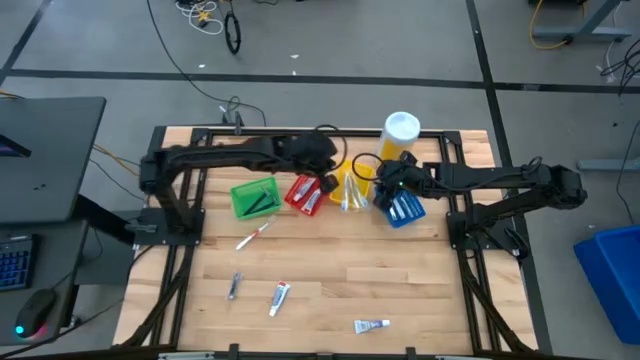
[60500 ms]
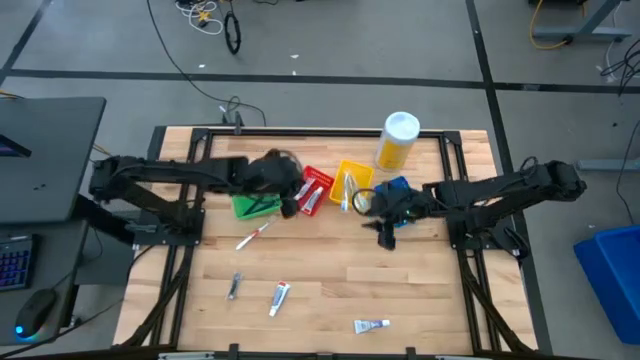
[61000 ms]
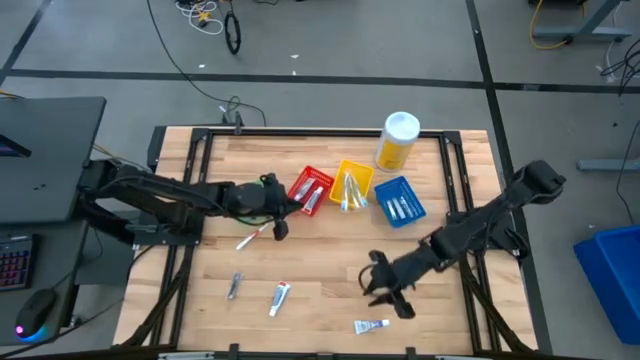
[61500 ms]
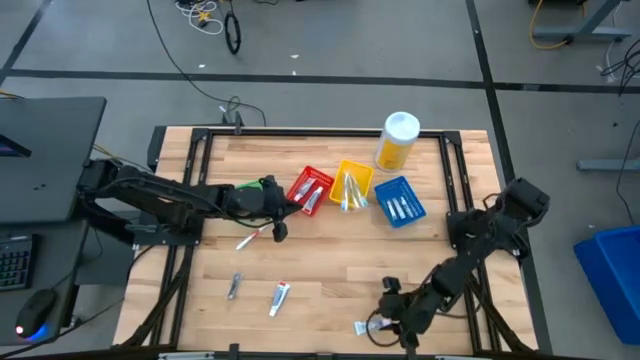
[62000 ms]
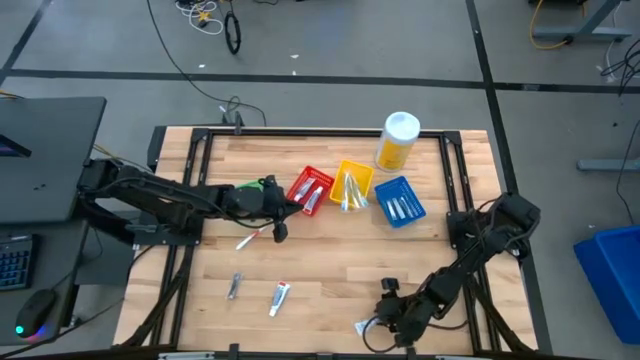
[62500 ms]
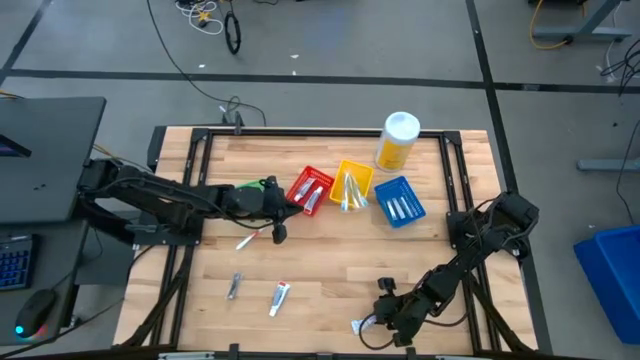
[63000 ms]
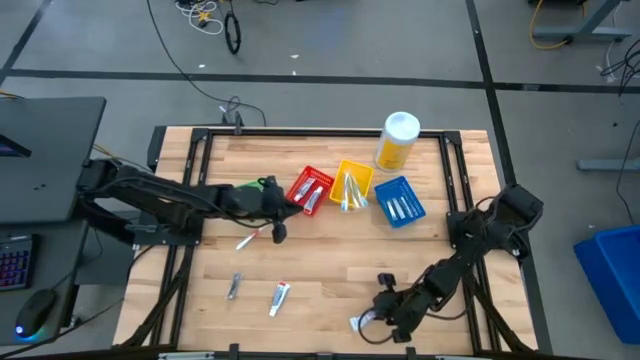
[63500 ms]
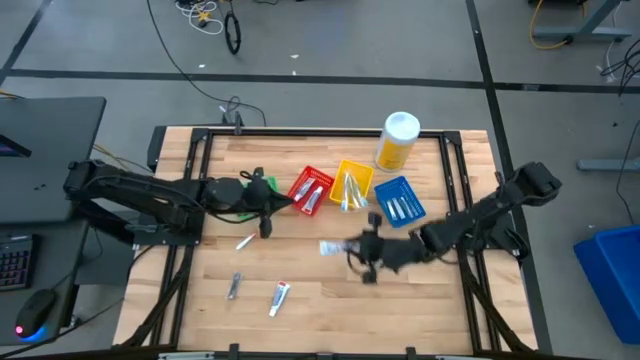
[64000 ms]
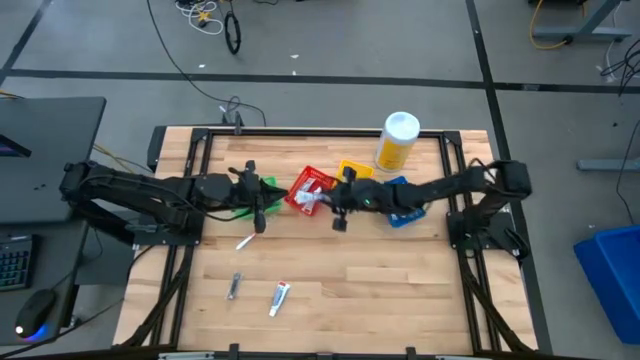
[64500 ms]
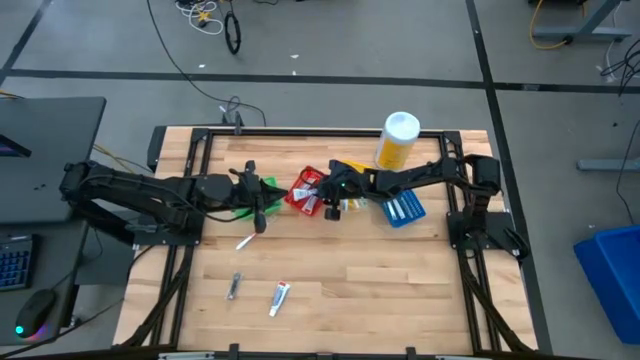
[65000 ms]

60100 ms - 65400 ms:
Task: Pick & Place Travel size toiletries
Put the white toothpaste into the red bin

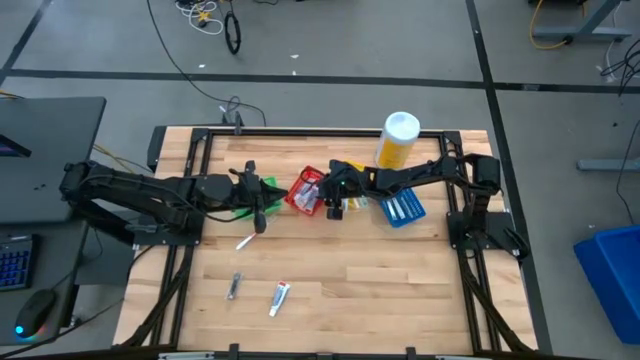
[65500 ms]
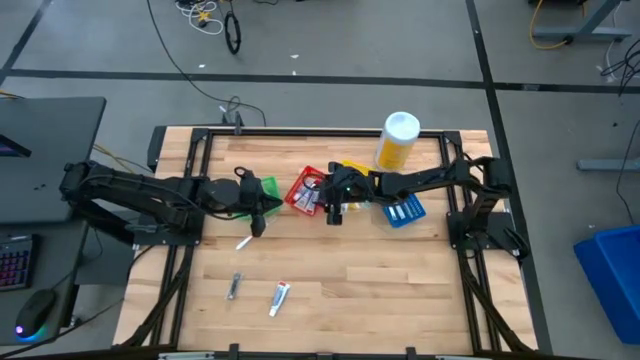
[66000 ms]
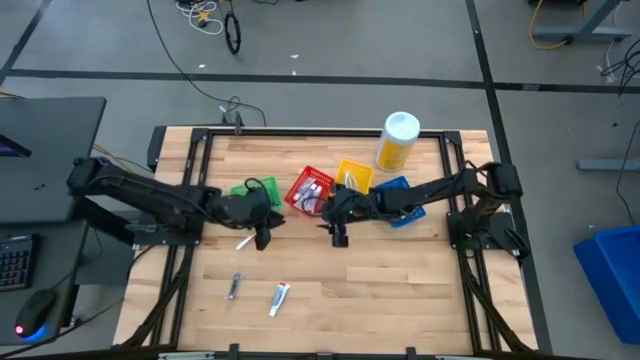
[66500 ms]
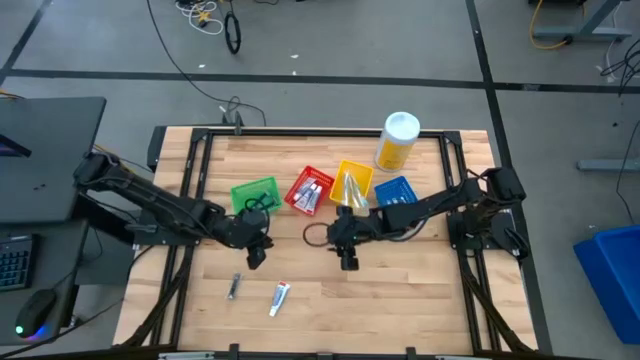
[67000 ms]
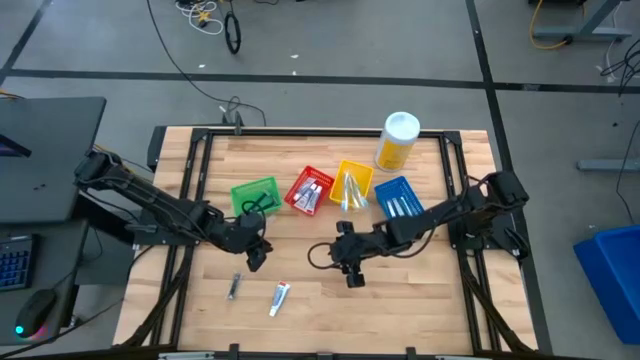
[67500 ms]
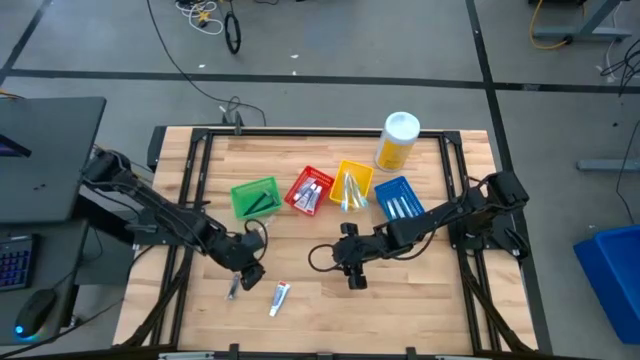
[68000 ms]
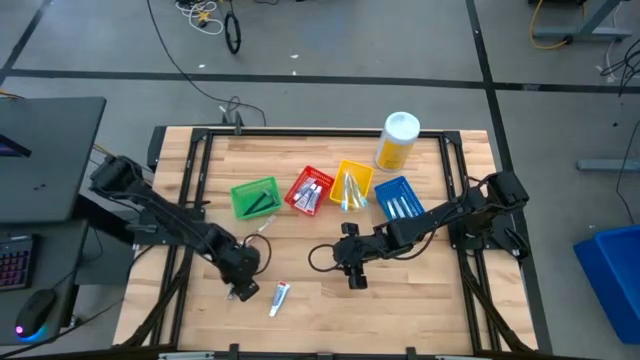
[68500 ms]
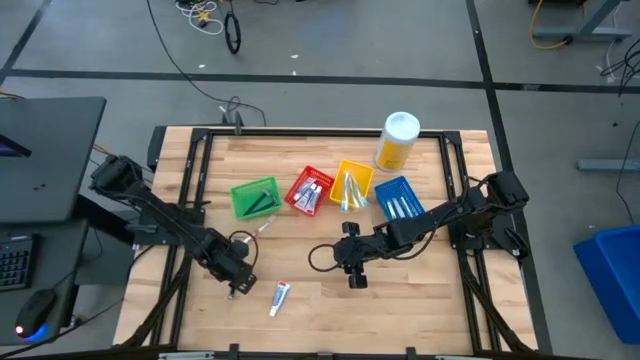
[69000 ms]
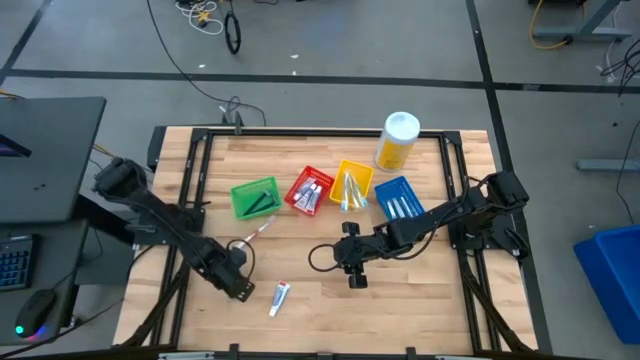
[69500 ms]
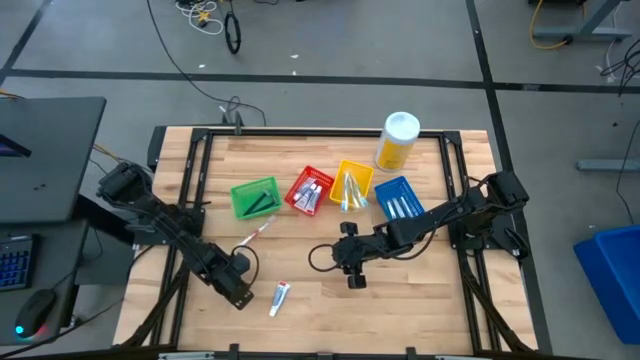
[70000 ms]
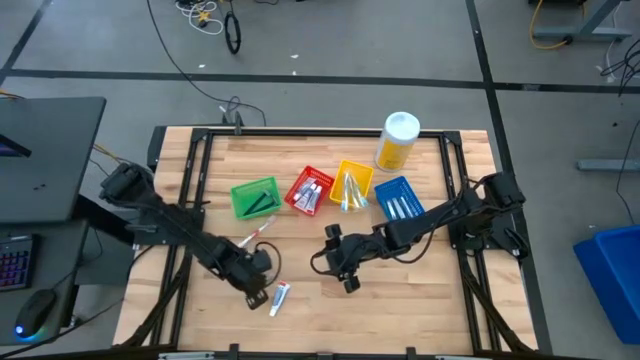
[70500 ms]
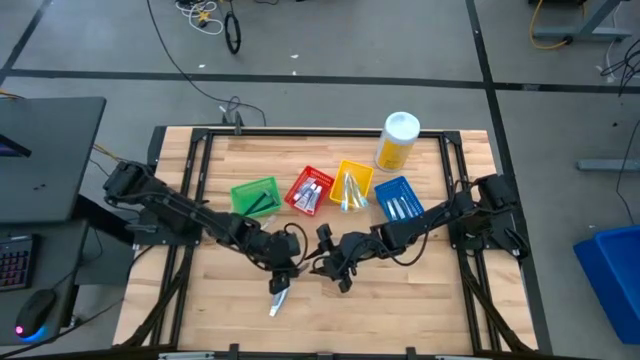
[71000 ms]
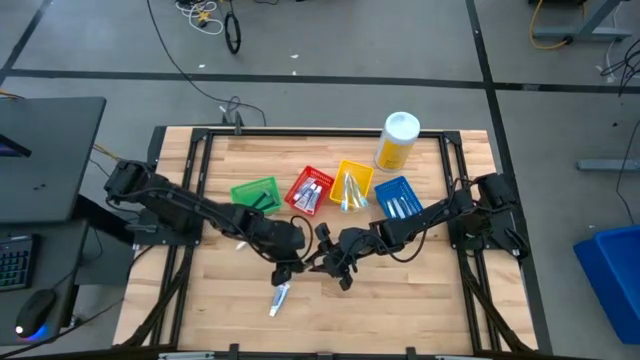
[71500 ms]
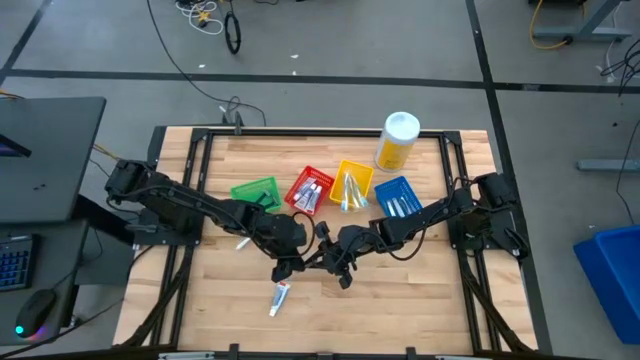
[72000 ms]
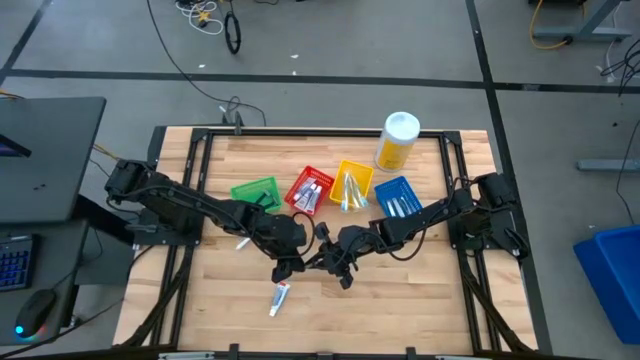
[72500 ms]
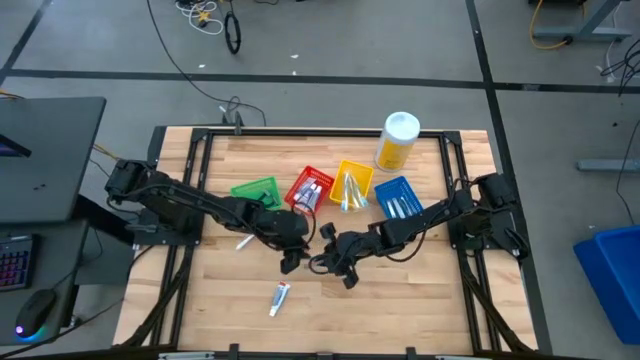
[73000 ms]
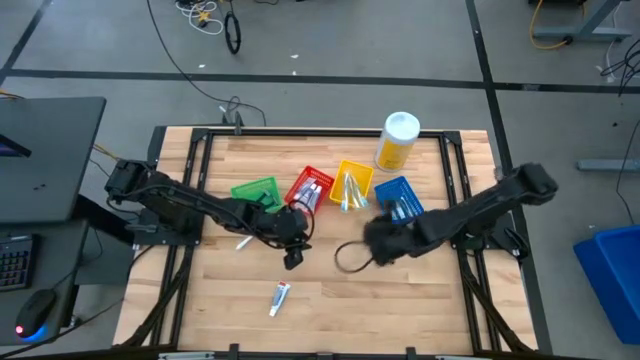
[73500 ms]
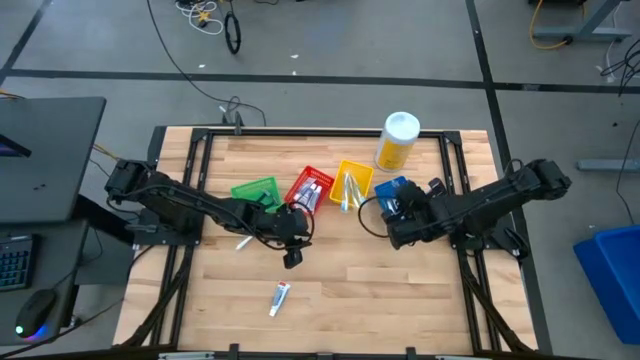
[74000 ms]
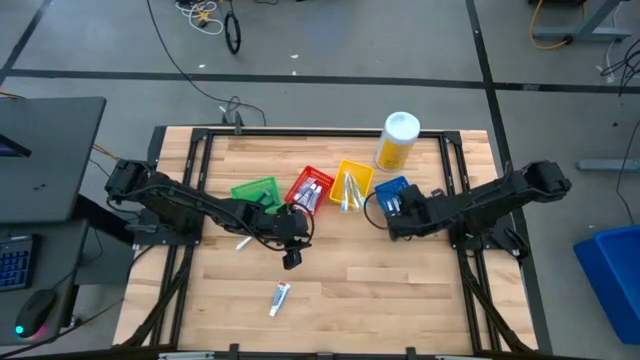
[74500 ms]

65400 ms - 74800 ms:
Put the silver nail cutter into the blue bin

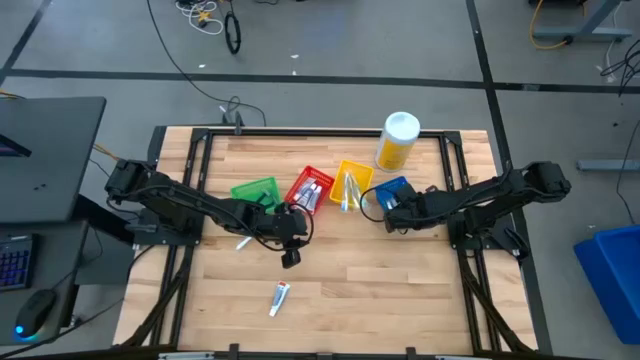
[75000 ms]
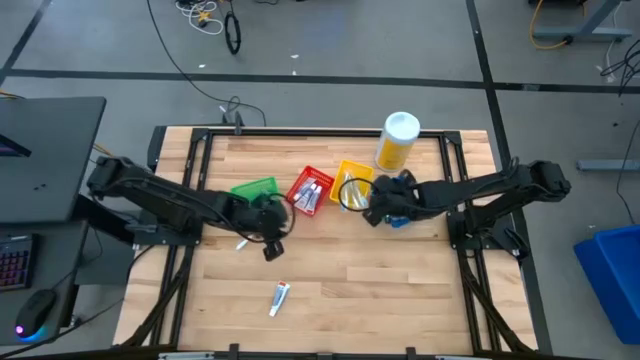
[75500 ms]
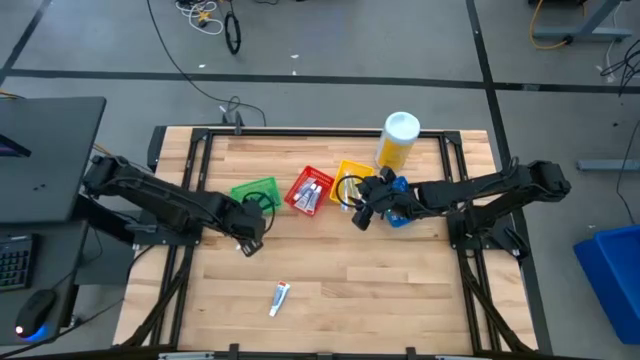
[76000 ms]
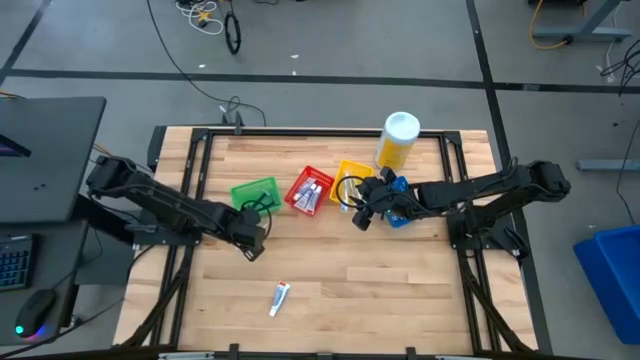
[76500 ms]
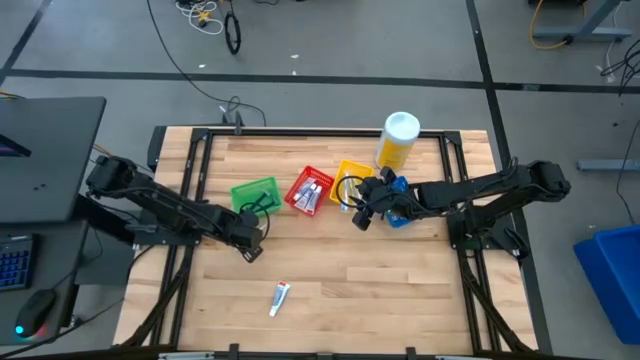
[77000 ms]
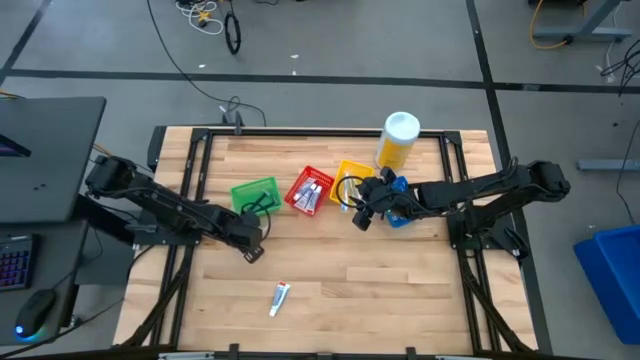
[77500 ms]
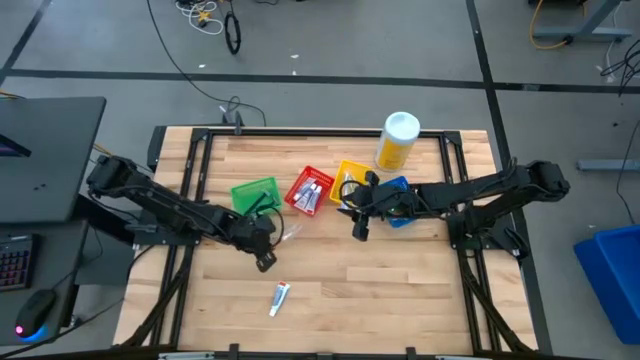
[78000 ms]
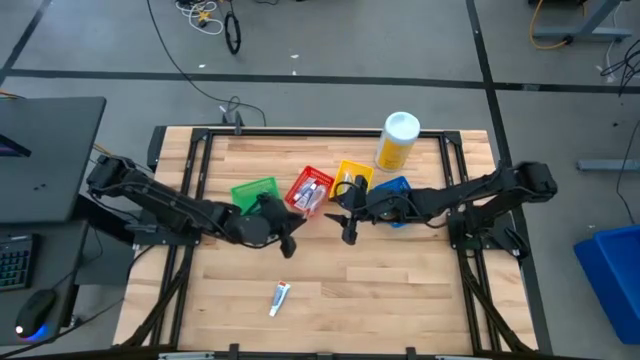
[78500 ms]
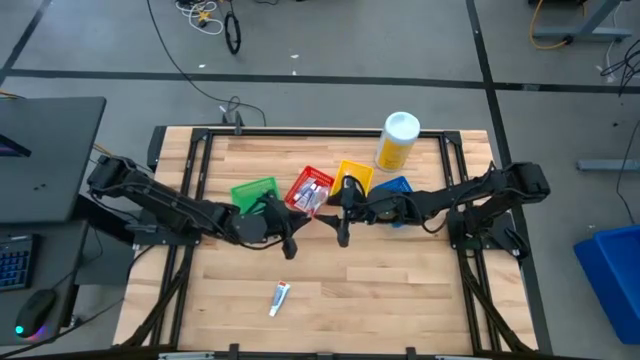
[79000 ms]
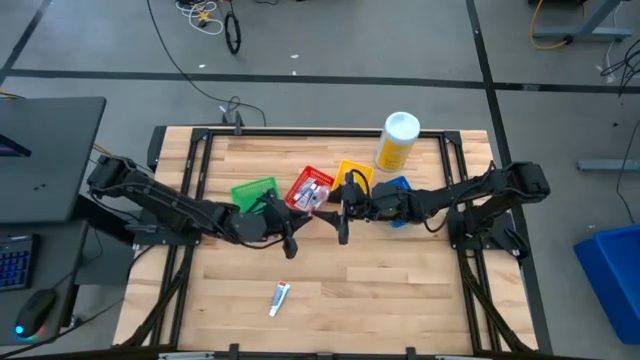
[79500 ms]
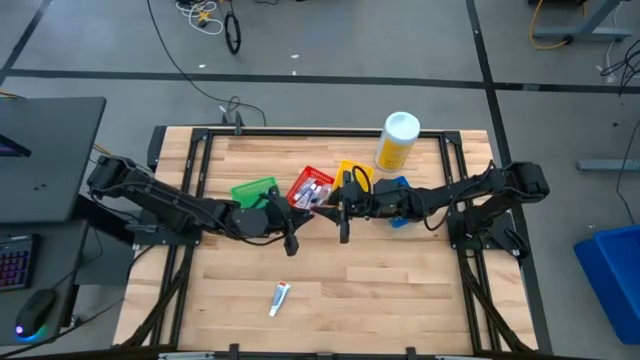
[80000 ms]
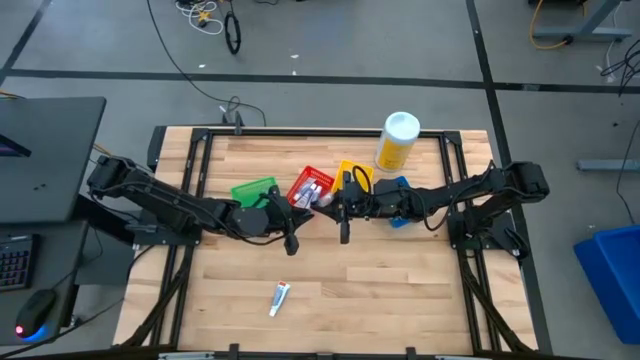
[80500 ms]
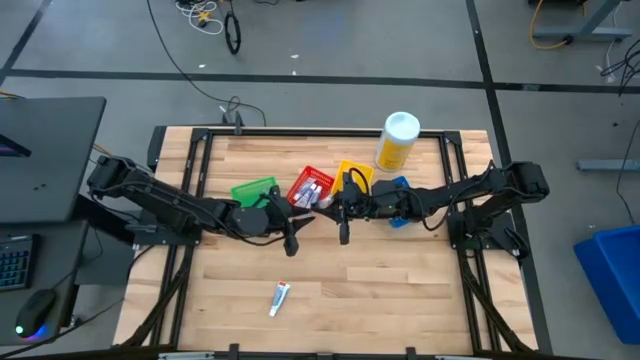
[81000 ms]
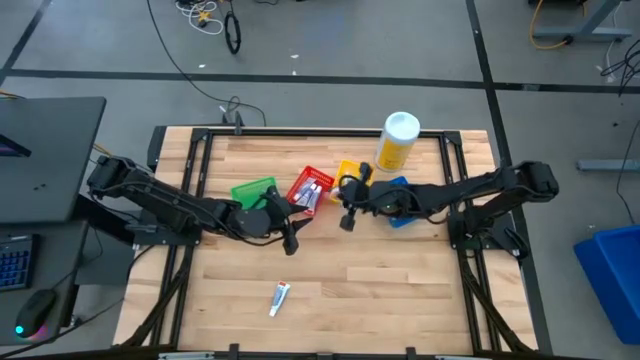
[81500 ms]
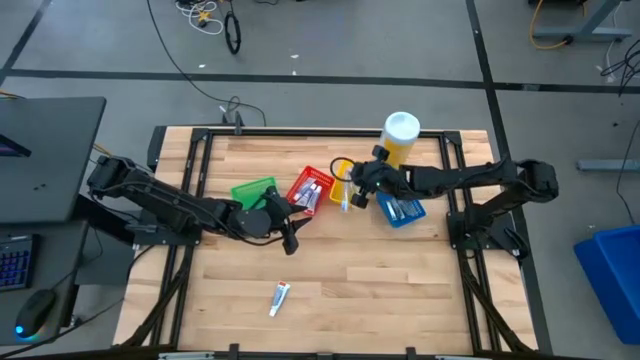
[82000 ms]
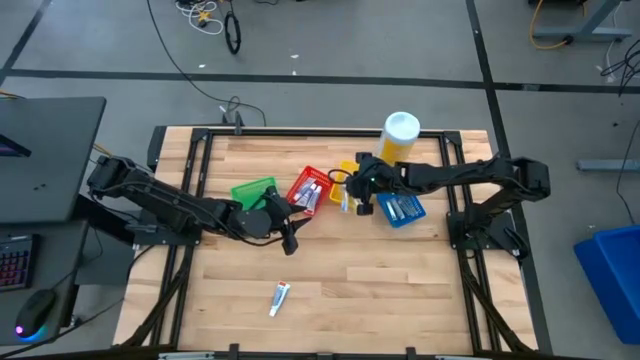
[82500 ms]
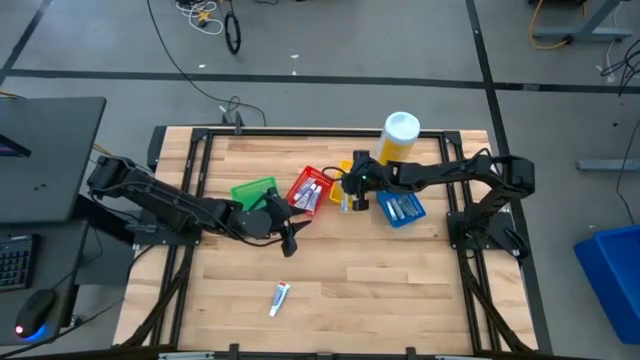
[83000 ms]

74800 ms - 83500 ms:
Put the orange toothbrush into the yellow bin
